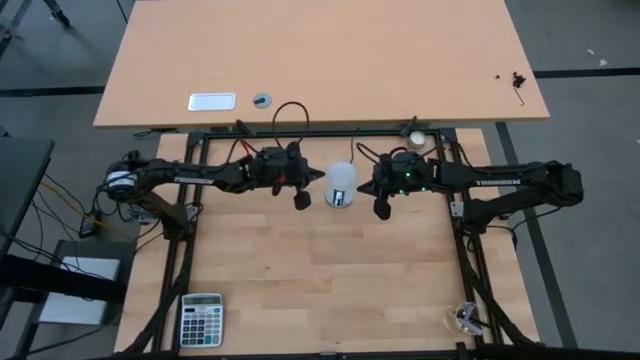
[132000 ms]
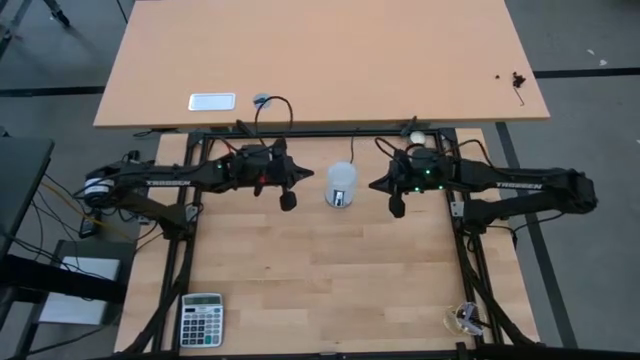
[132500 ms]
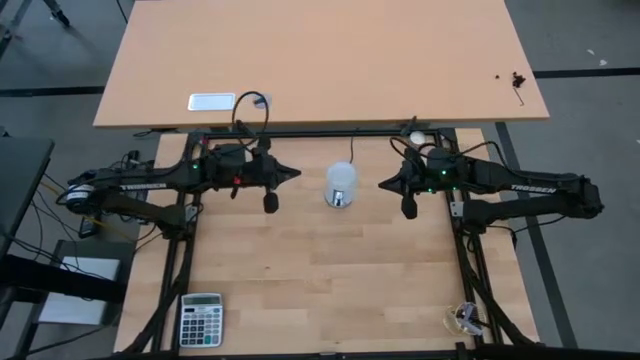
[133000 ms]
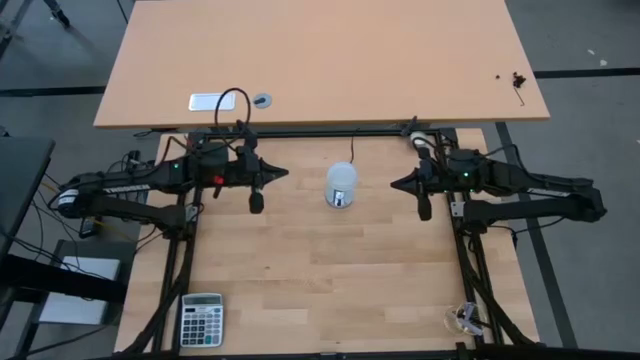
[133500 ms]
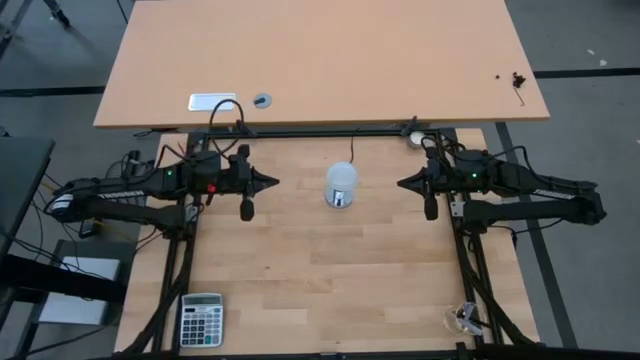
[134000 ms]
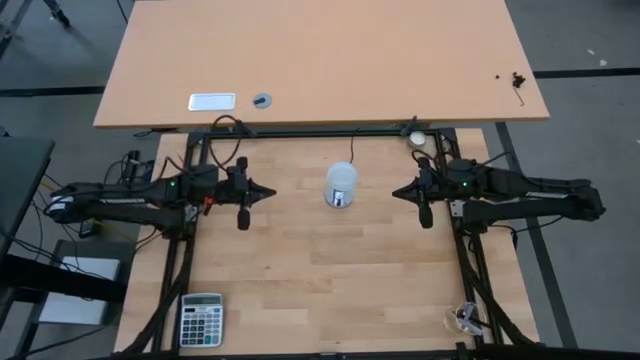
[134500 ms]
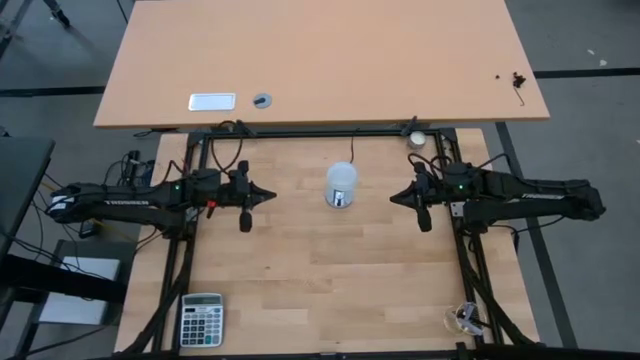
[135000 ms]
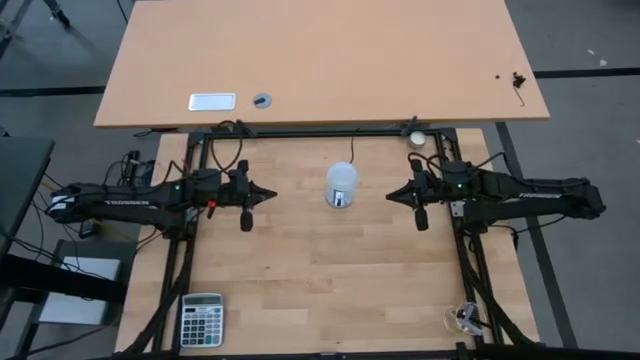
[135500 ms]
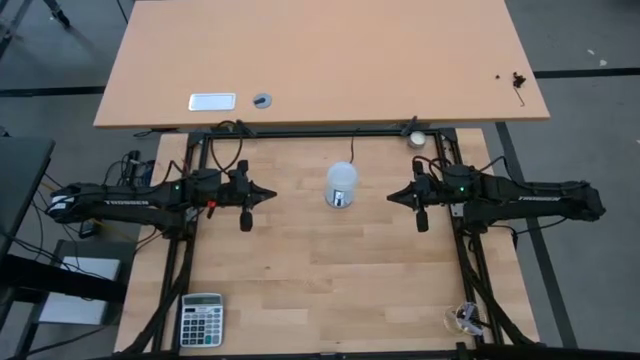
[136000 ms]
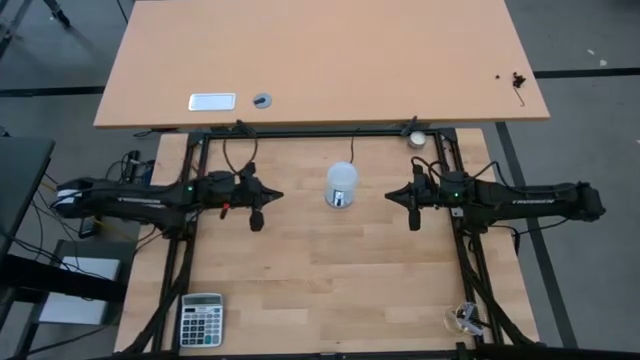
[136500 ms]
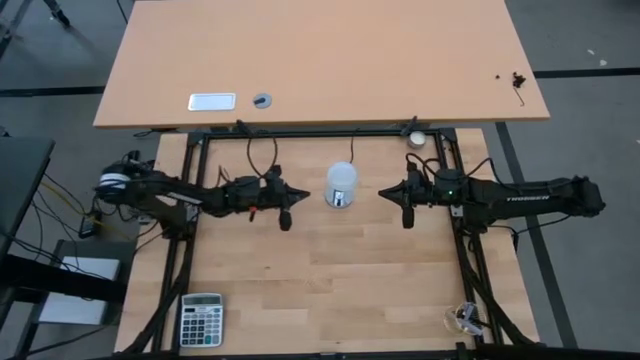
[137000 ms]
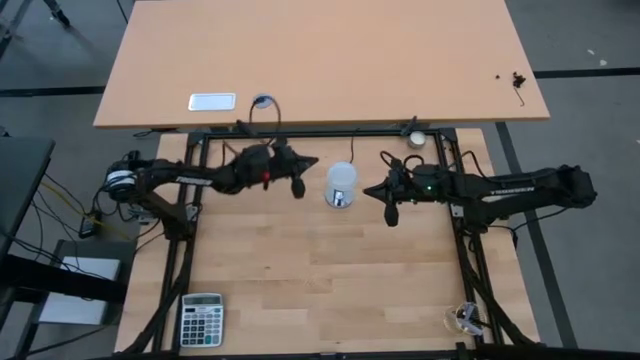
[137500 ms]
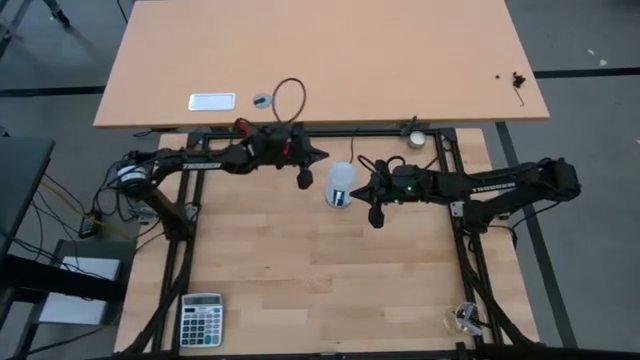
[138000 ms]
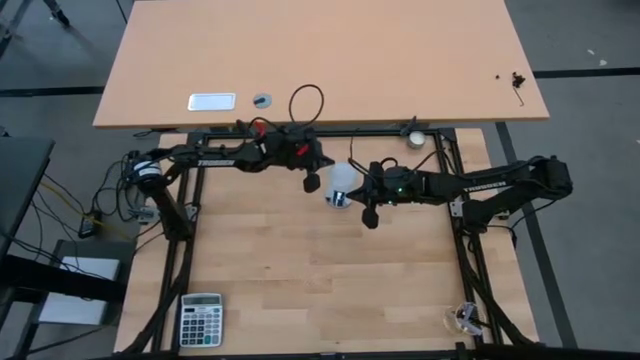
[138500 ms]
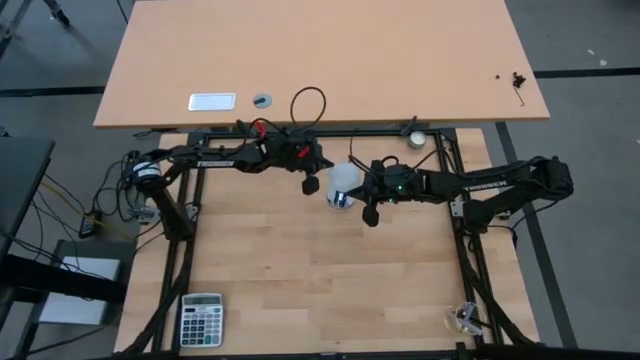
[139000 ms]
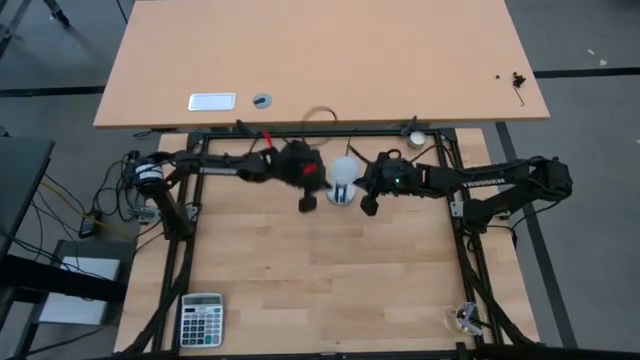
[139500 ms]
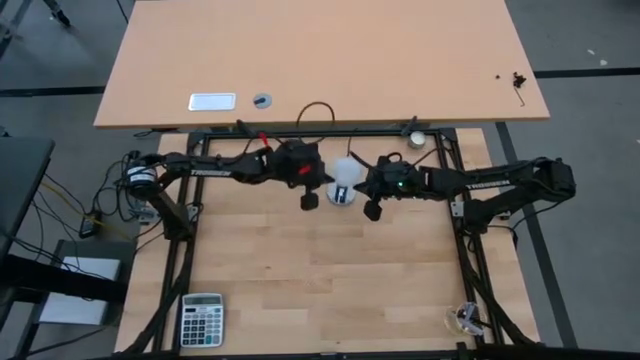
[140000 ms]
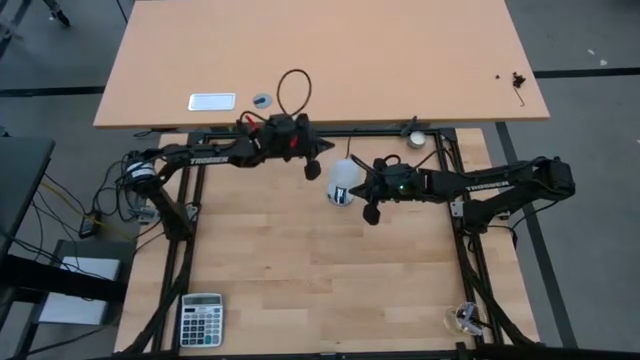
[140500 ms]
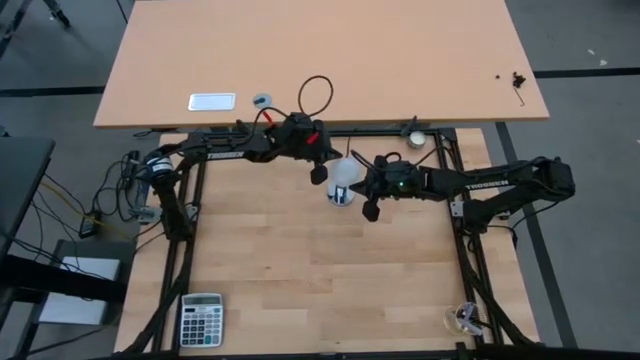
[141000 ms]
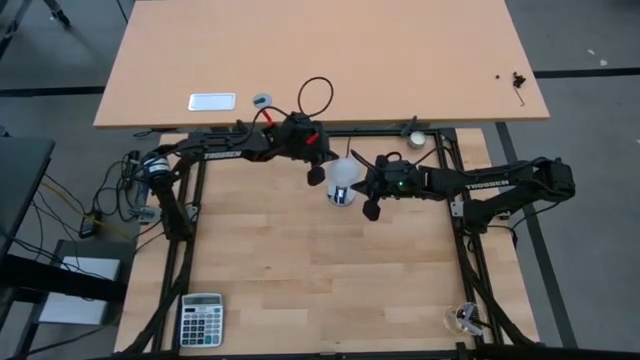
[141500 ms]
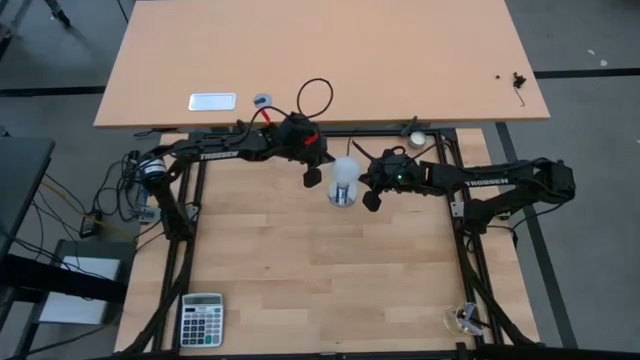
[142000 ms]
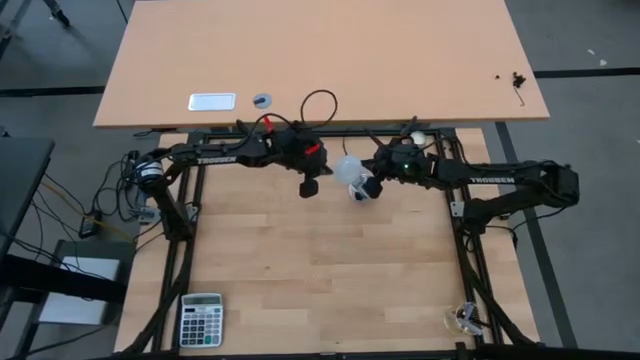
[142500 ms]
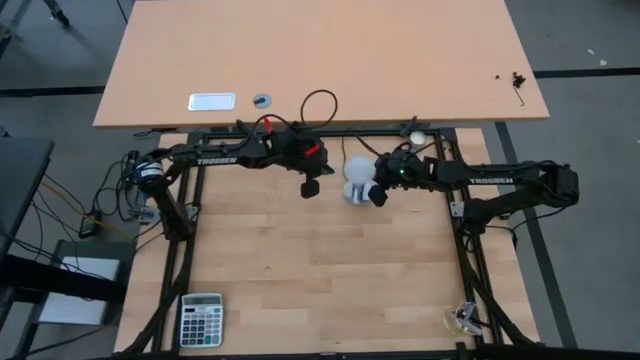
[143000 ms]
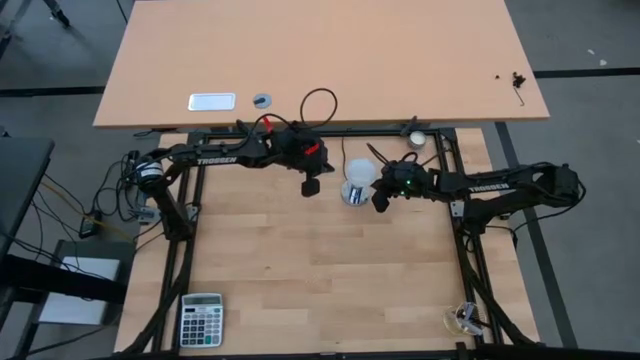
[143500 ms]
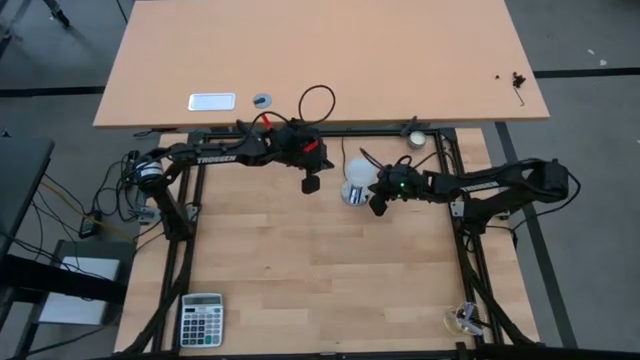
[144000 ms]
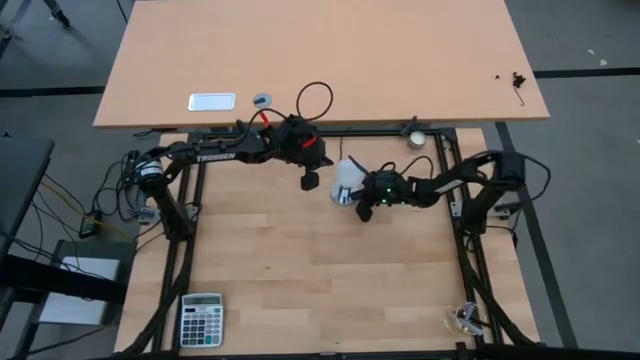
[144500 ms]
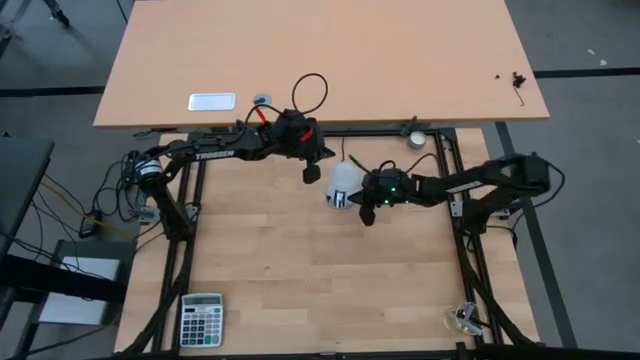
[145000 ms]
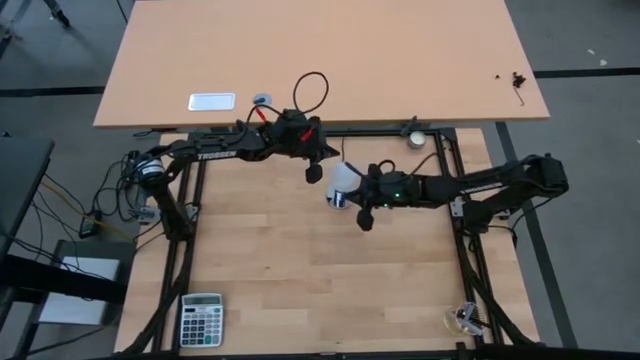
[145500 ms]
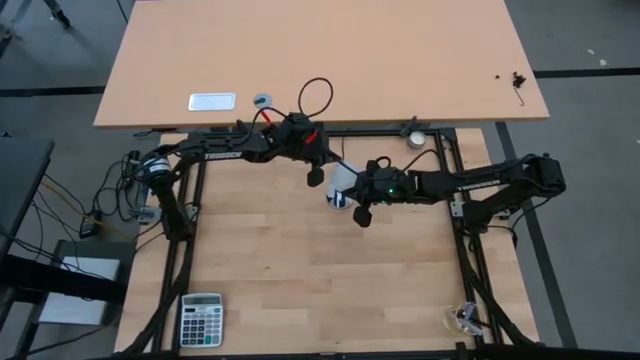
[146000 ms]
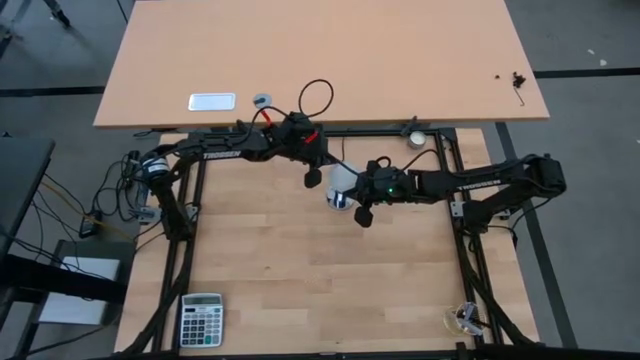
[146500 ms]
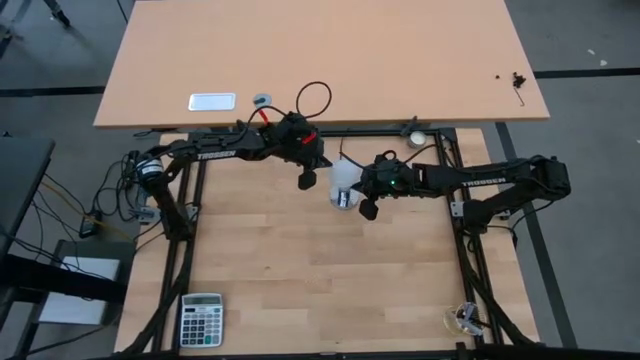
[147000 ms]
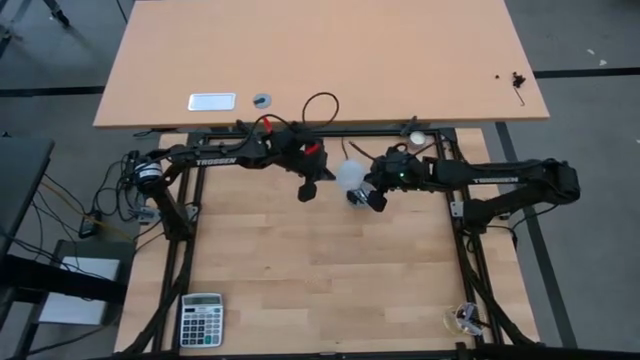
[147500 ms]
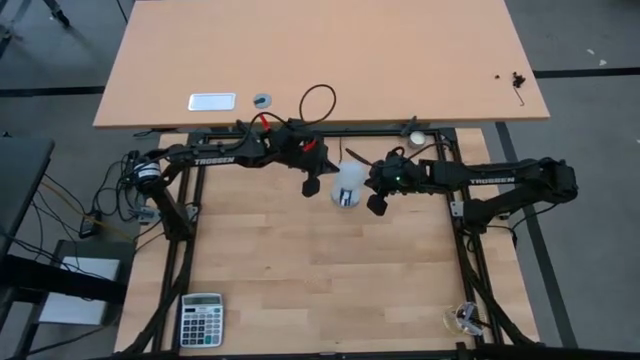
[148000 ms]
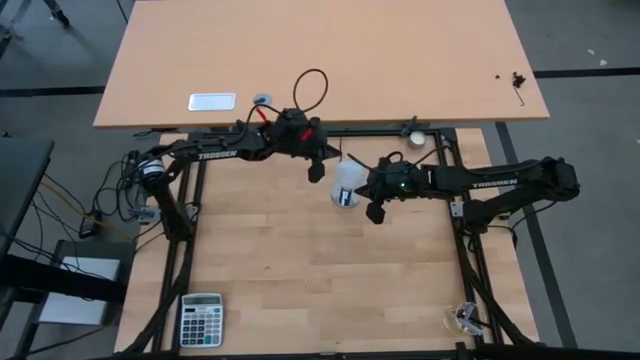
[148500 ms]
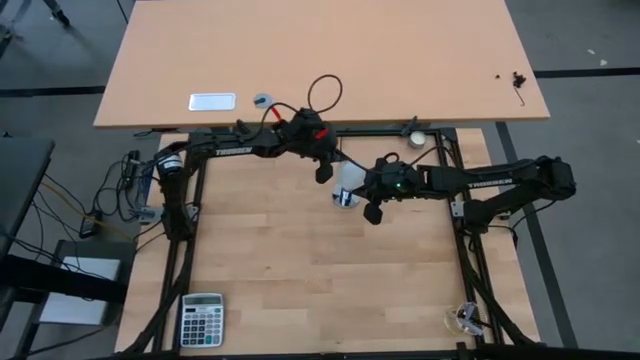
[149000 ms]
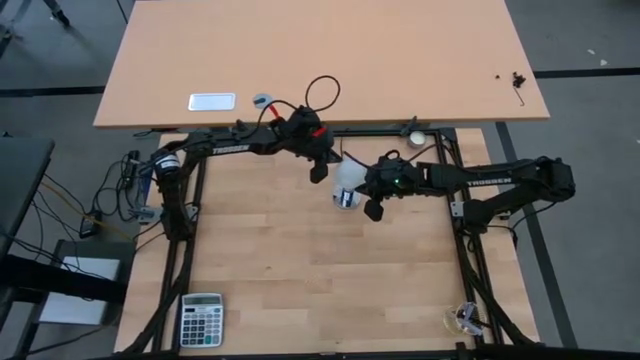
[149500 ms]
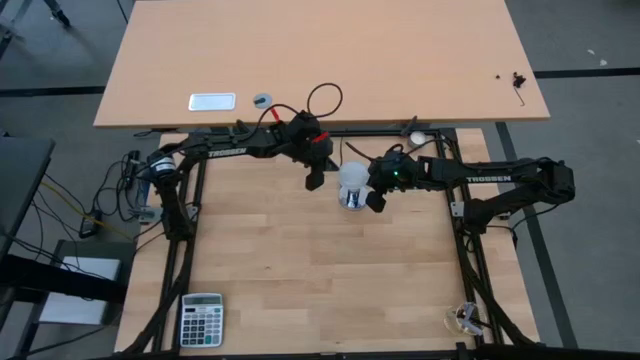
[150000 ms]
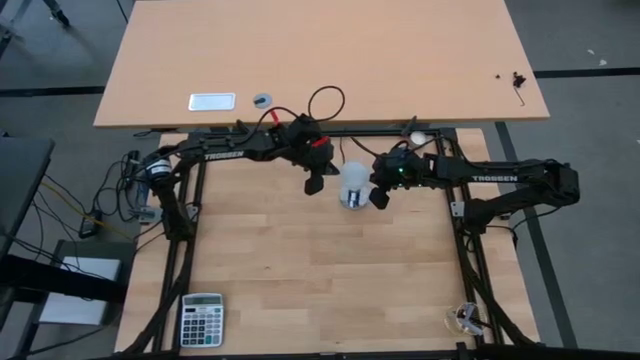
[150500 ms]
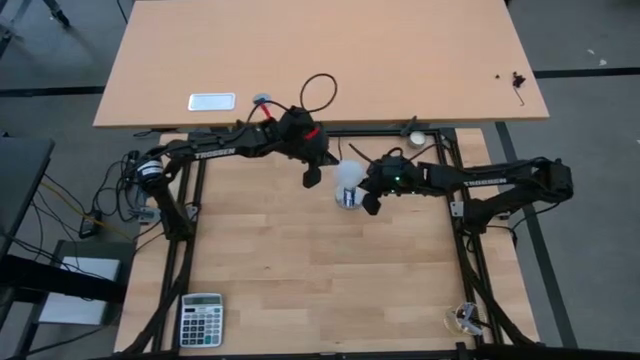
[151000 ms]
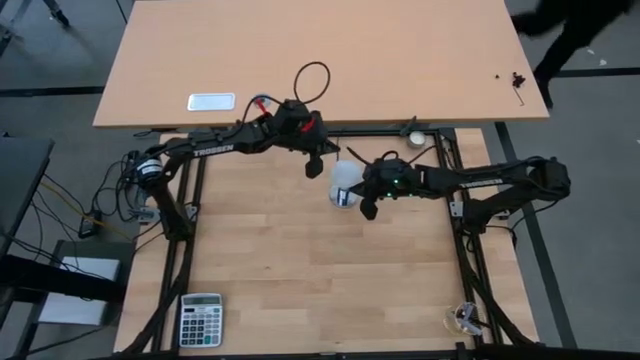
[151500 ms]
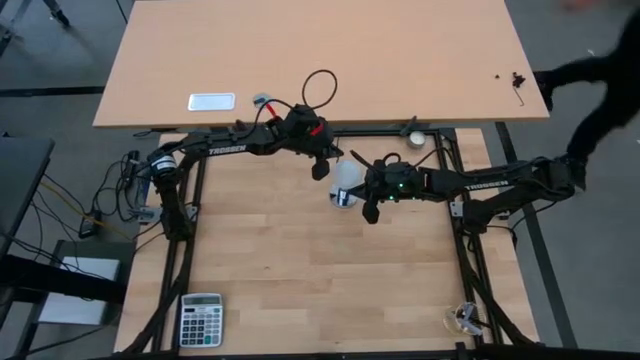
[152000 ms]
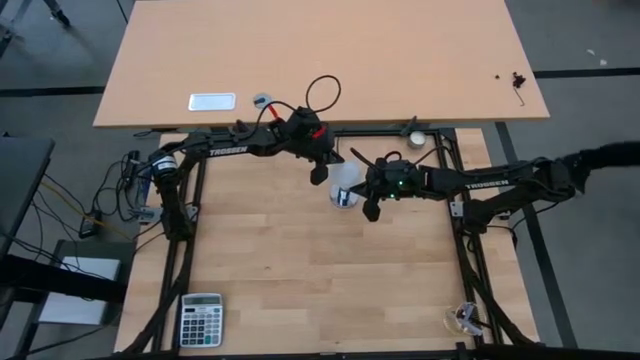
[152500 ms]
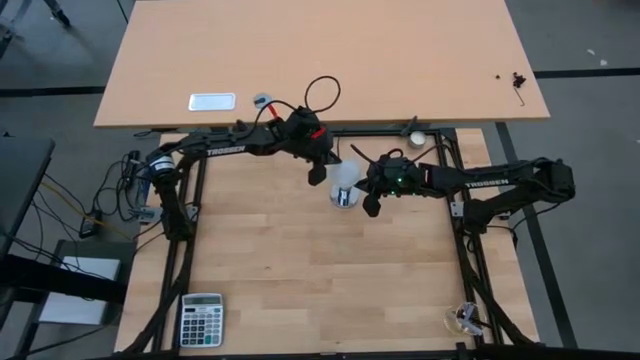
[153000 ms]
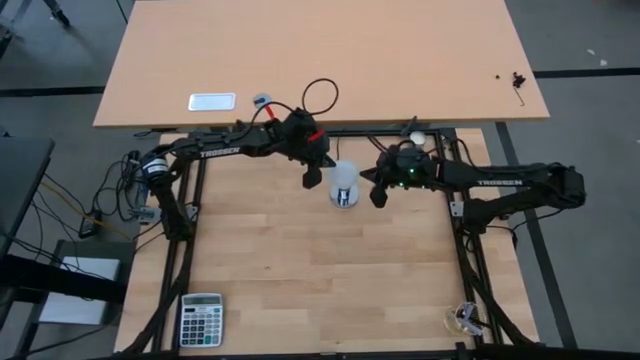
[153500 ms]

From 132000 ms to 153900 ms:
Task: Screw lightbulb
Remove the lightbulb from the silver lamp socket
